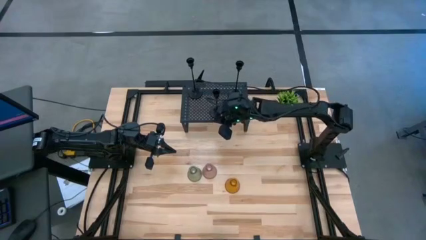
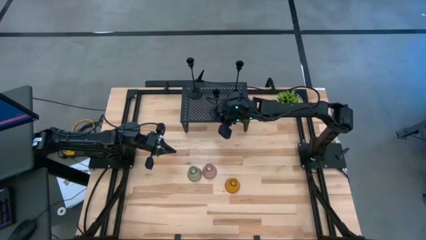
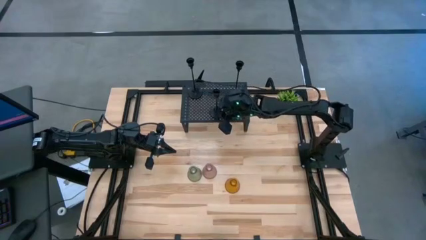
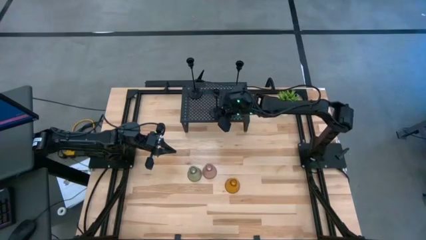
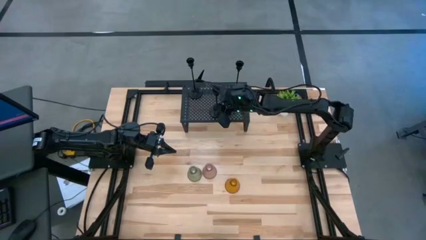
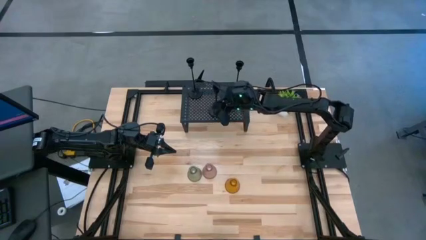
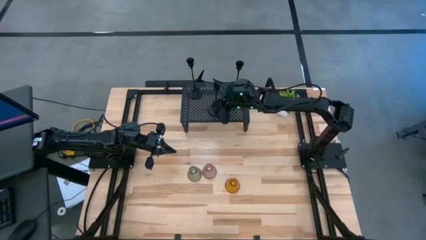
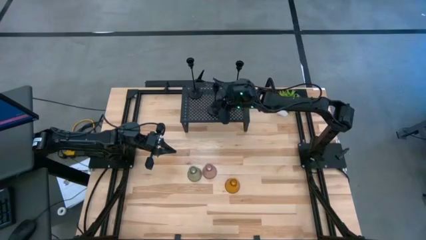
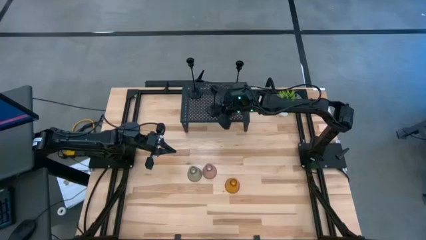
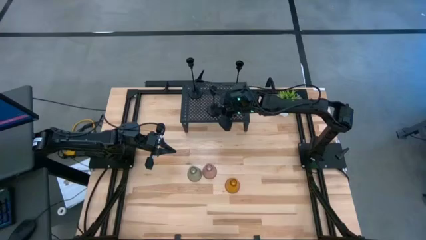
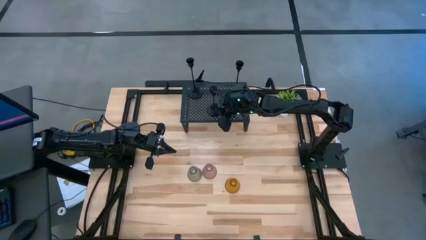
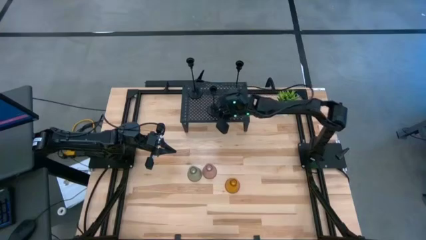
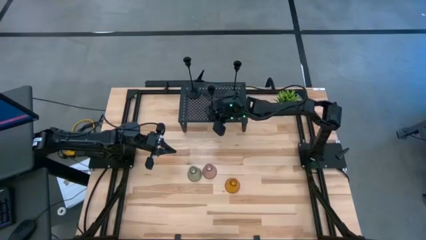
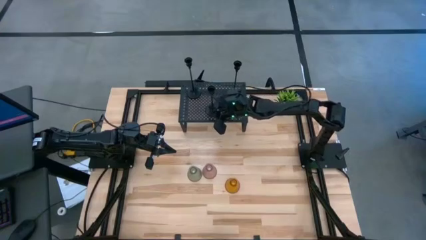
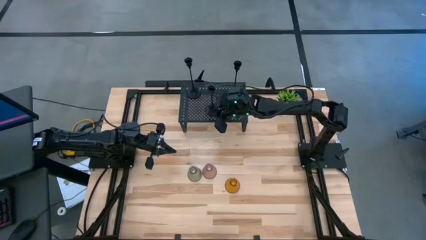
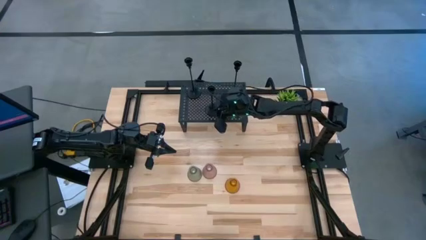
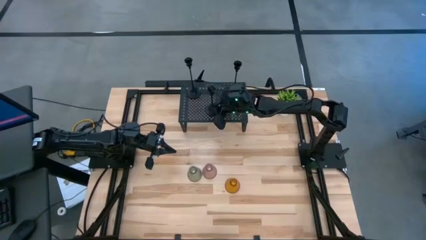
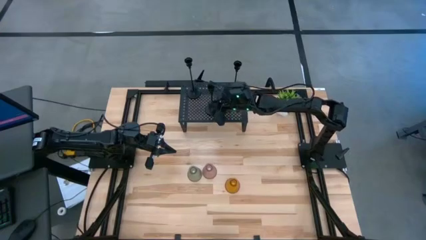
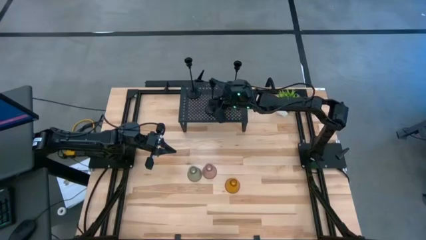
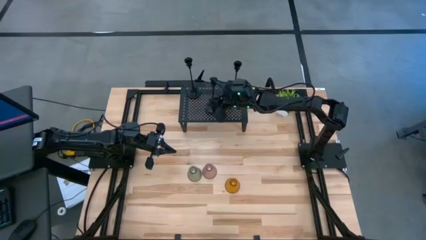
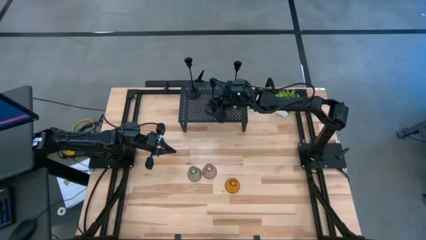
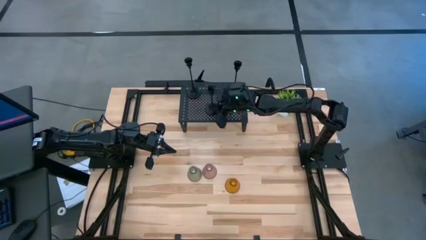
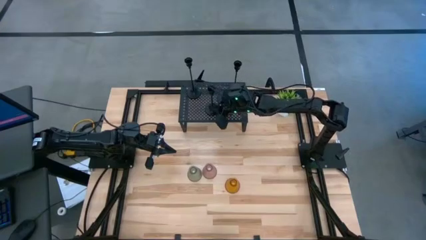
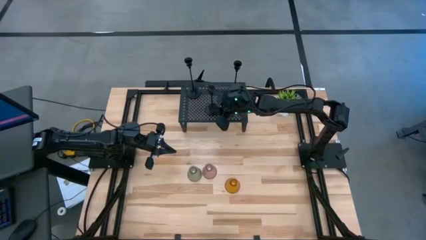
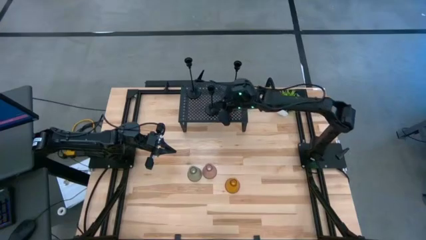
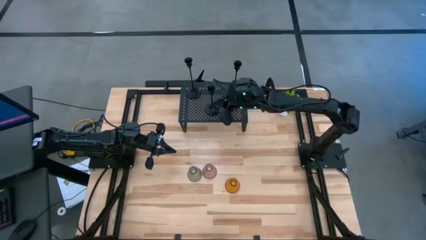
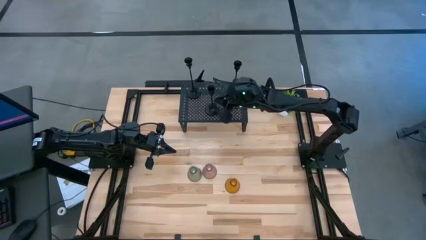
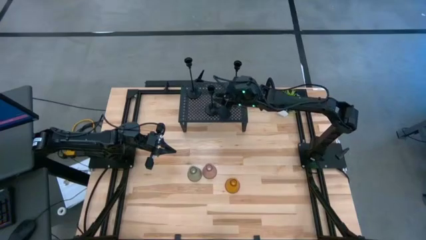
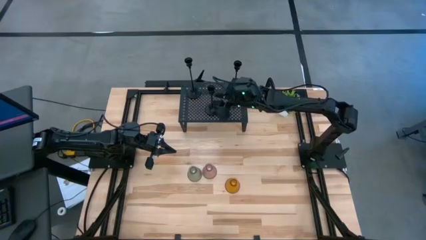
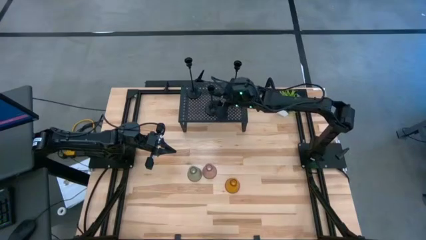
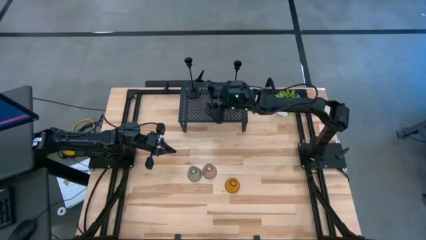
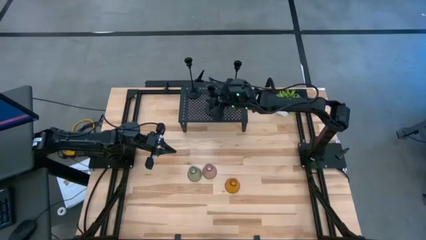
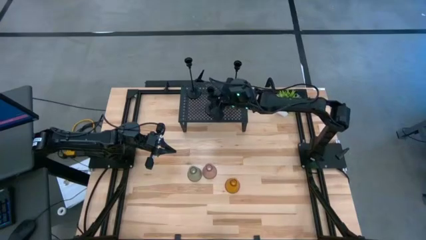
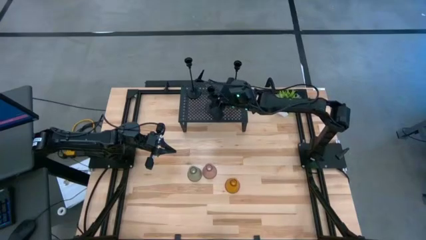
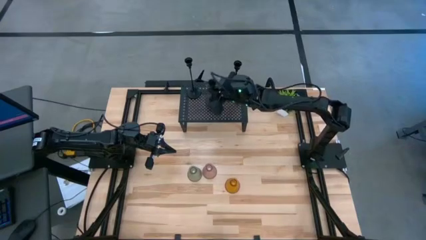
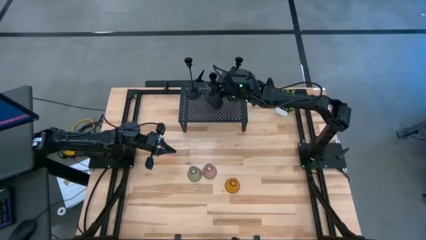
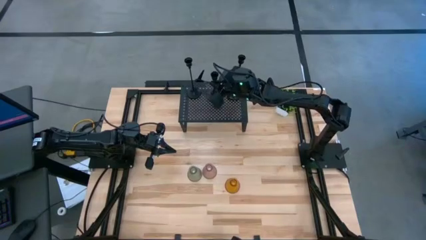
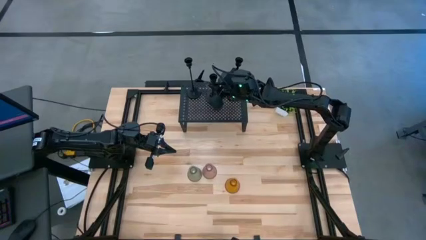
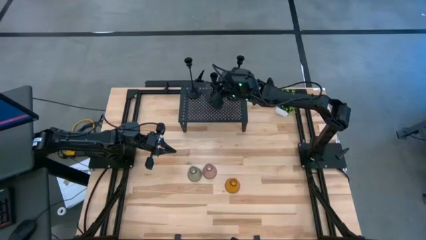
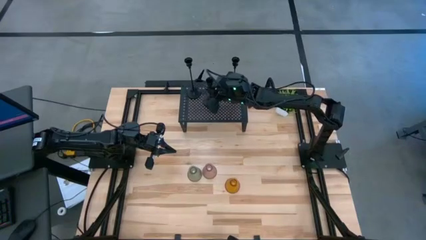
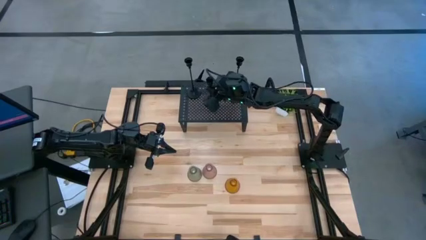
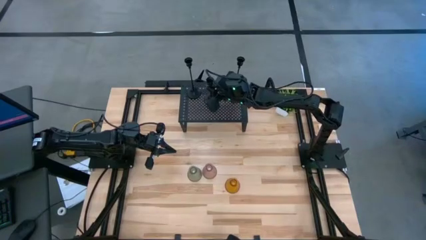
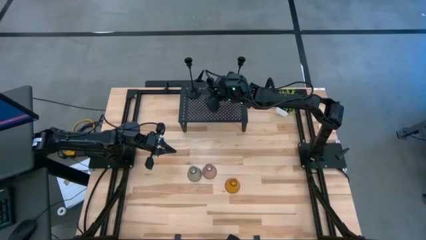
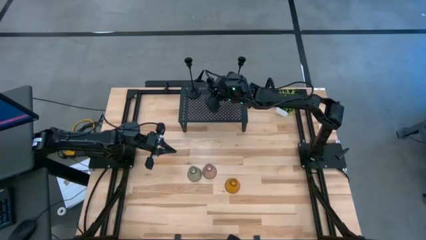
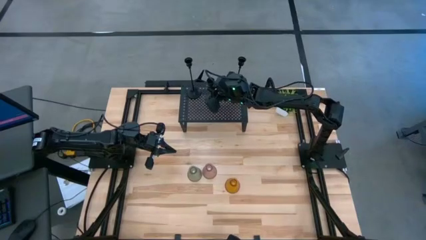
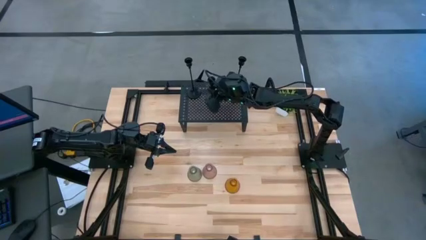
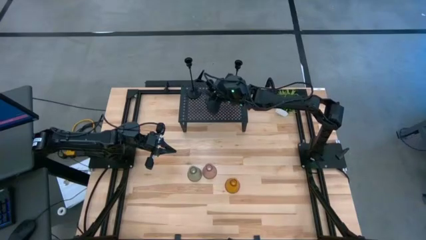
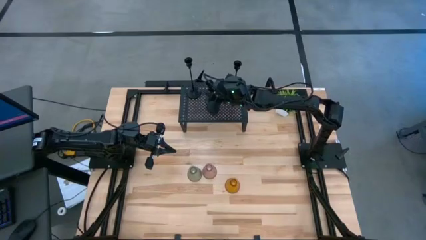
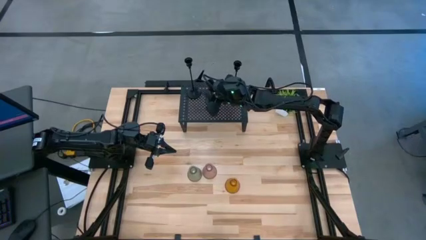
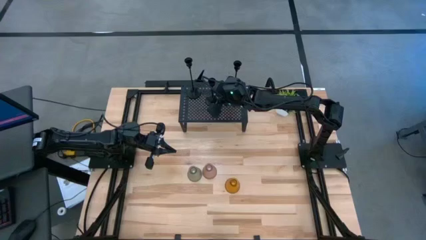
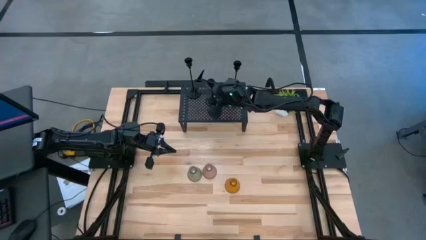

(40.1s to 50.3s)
Task: Pick & Place candle stick holders
Put the black candle holder on the shelf

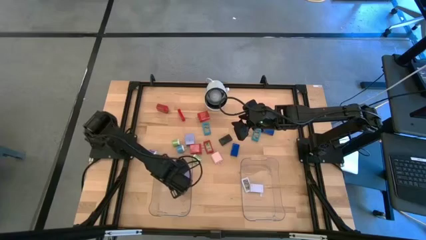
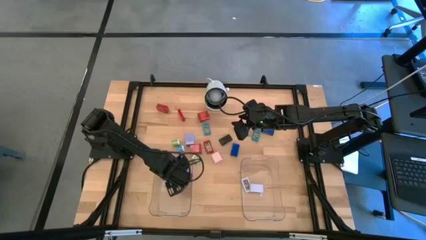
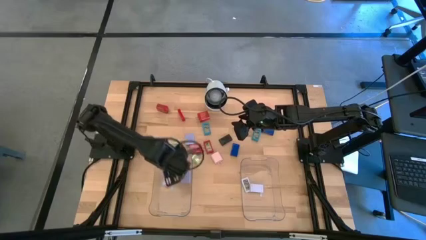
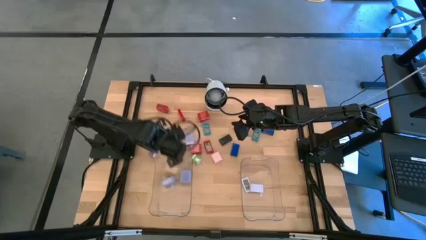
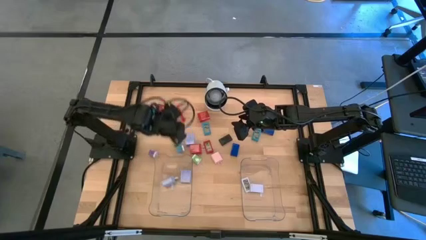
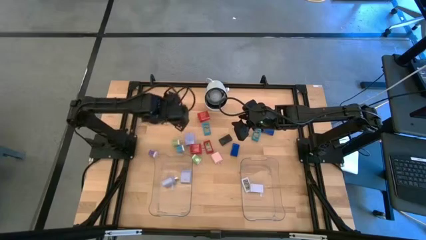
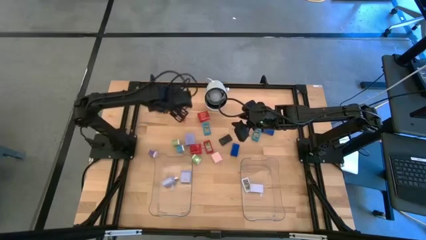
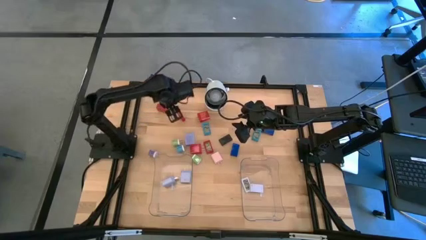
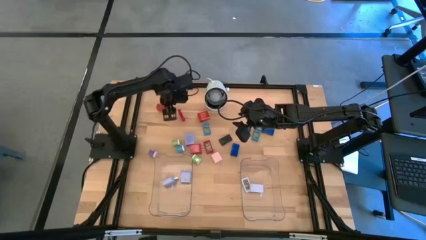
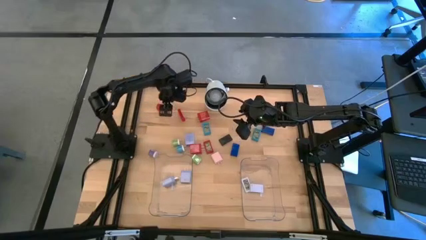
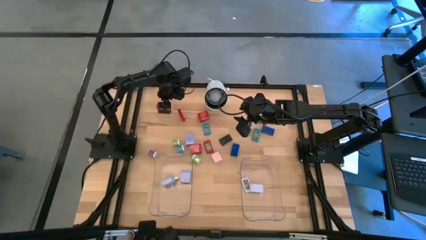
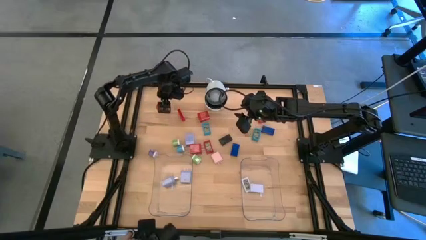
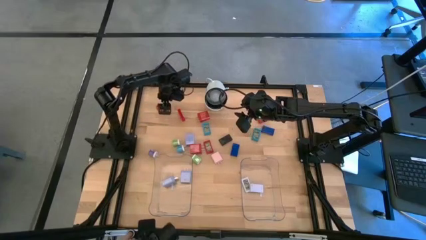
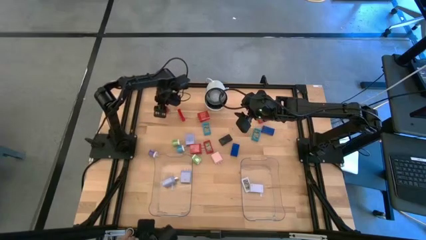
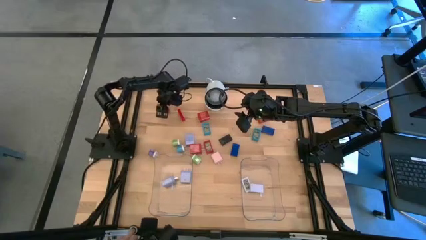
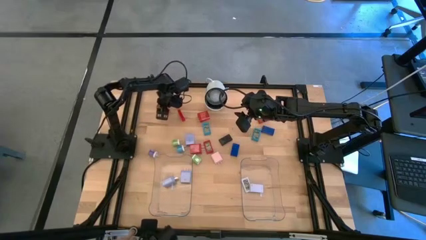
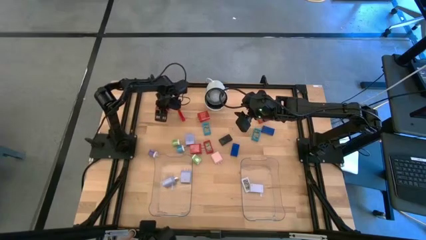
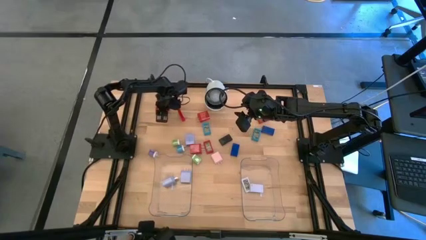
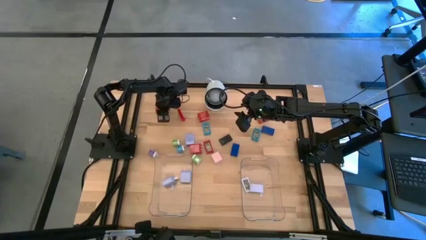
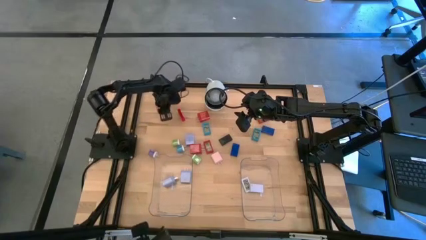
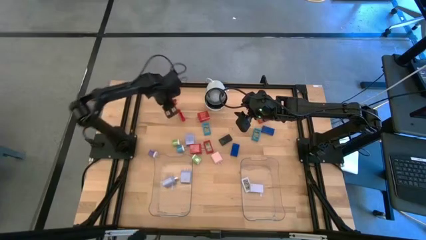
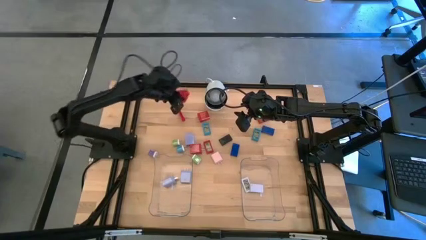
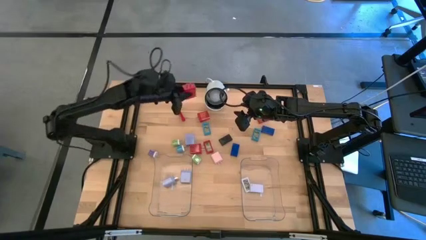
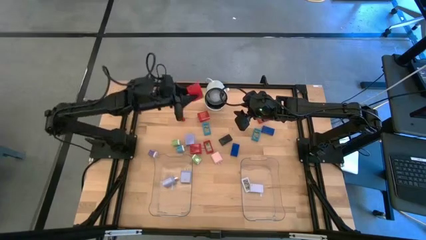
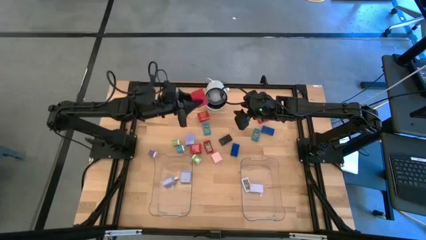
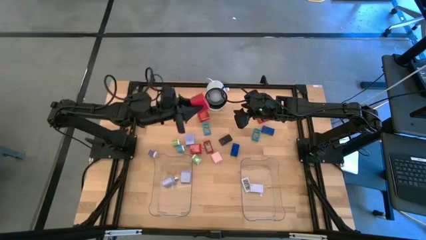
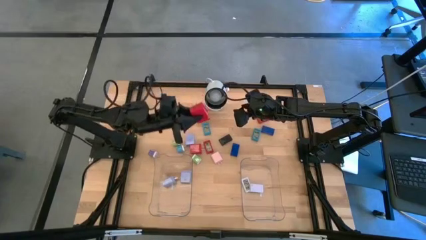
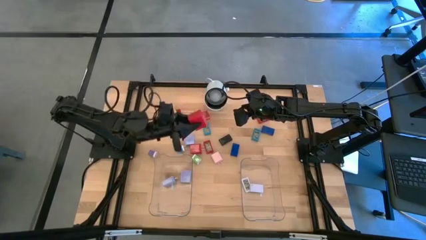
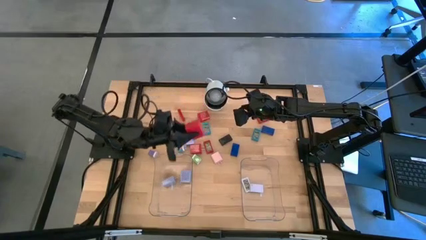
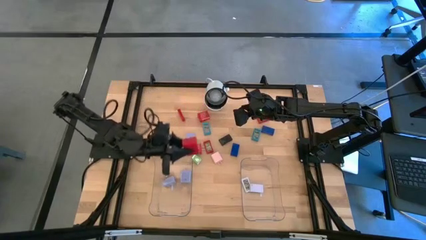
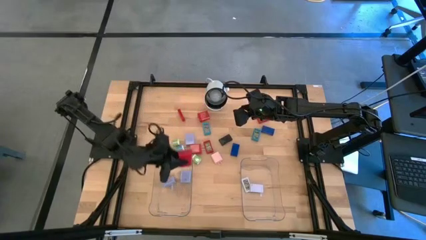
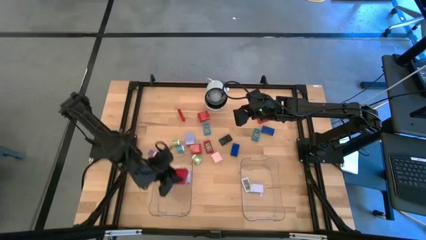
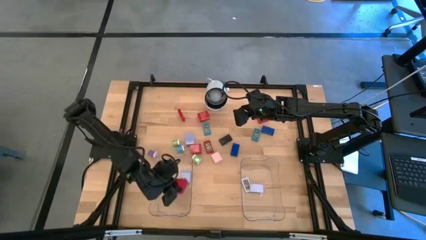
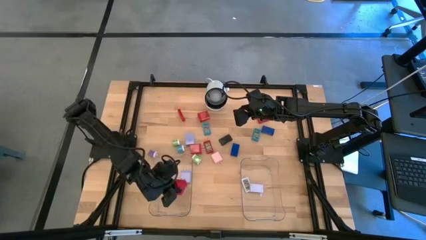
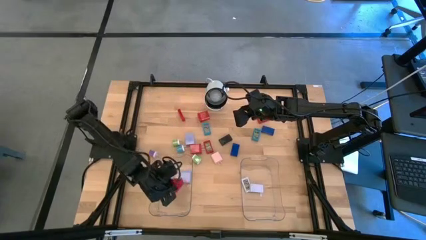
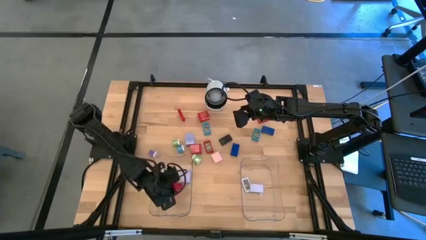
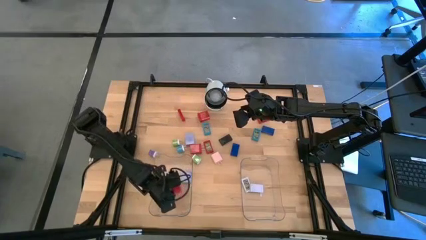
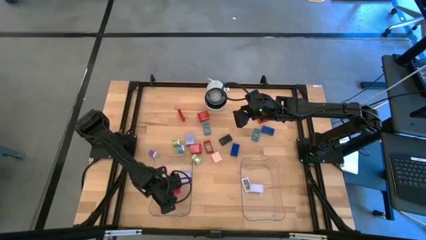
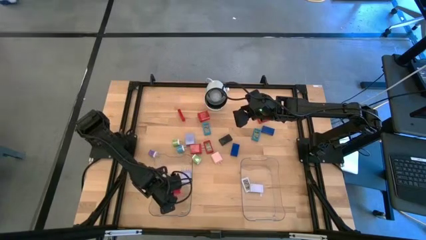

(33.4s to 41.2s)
Task: Pick & Place Office items
Put the top left red charger adapter into the left transparent bin
